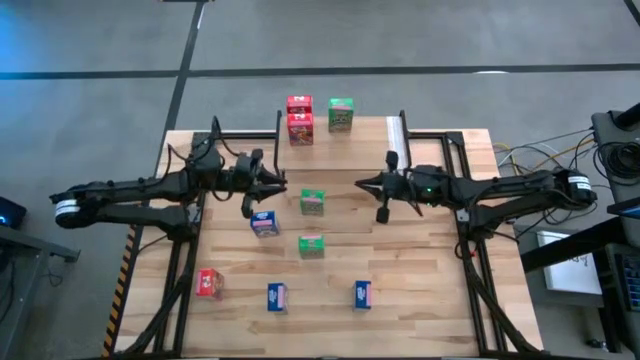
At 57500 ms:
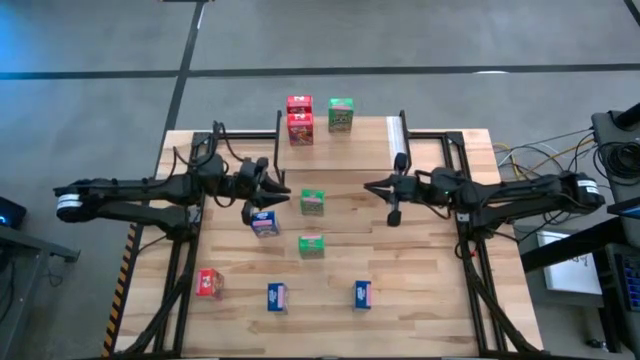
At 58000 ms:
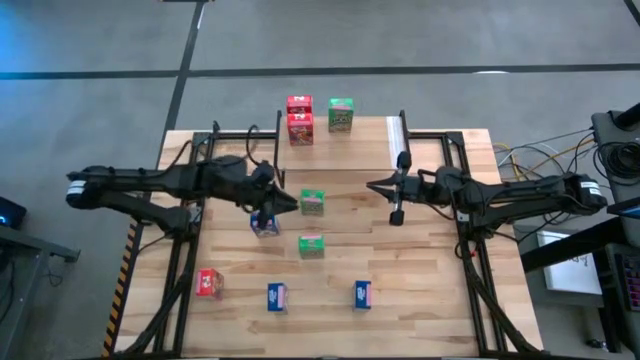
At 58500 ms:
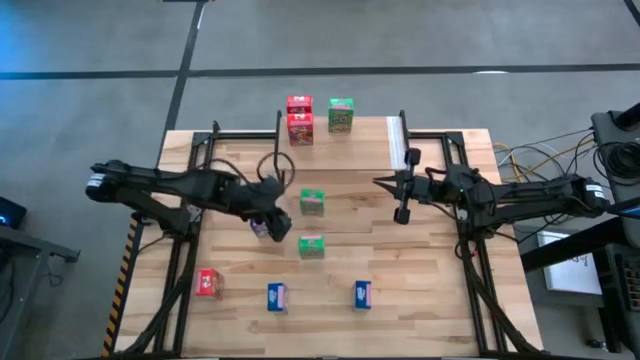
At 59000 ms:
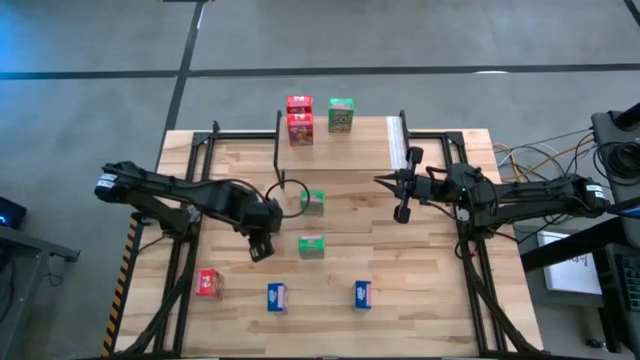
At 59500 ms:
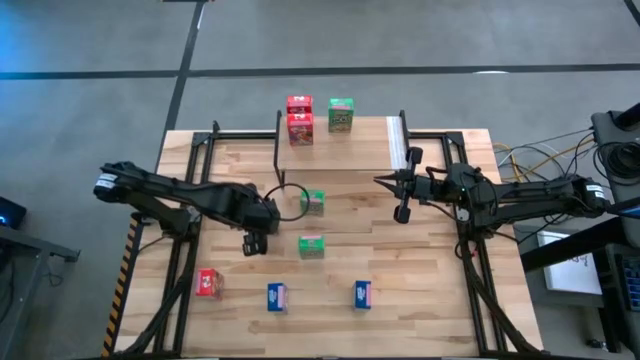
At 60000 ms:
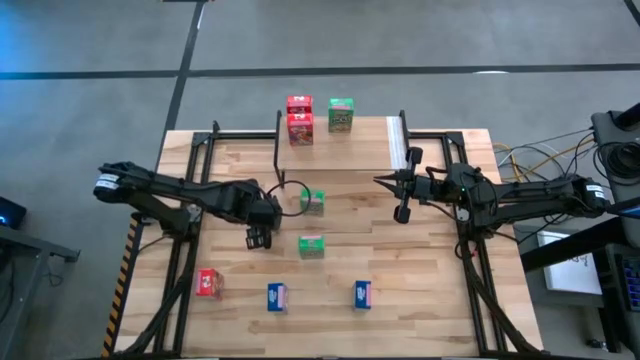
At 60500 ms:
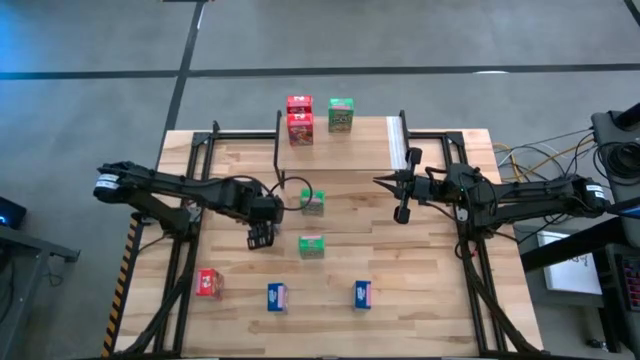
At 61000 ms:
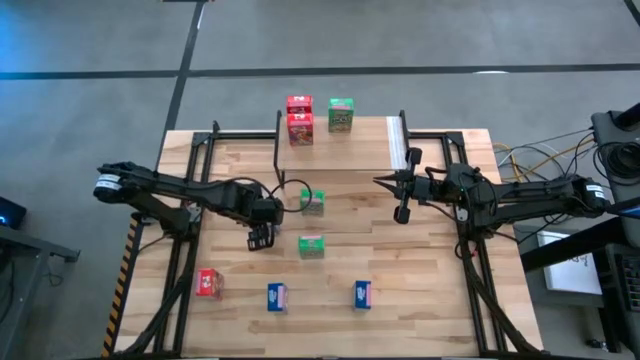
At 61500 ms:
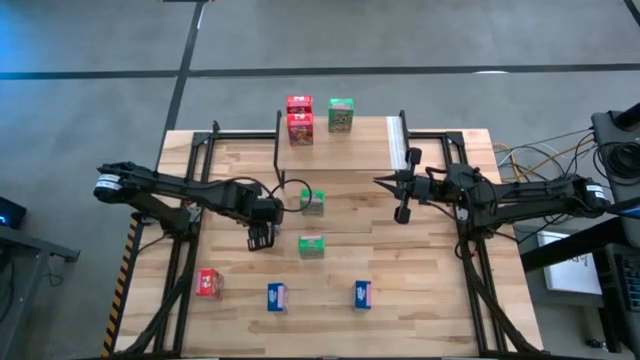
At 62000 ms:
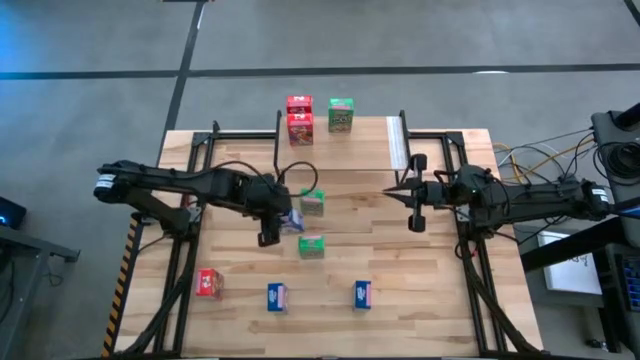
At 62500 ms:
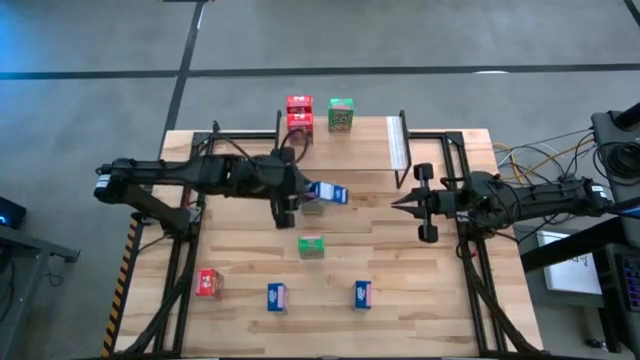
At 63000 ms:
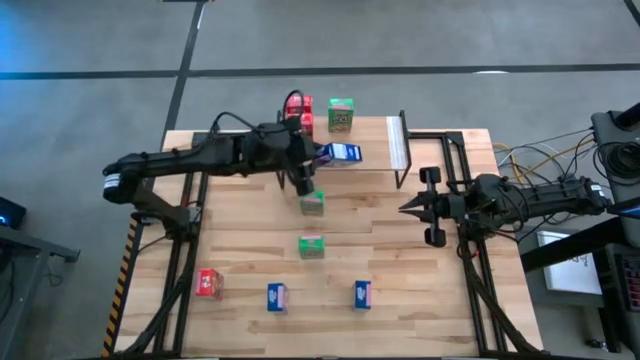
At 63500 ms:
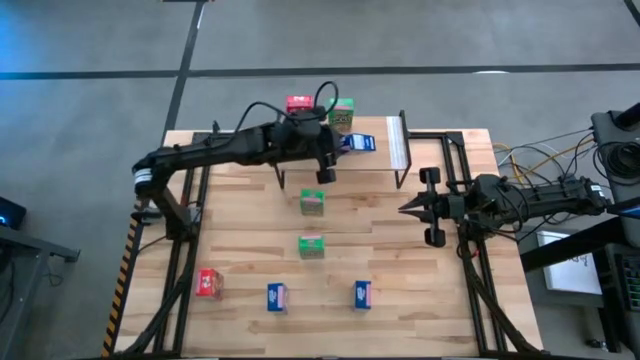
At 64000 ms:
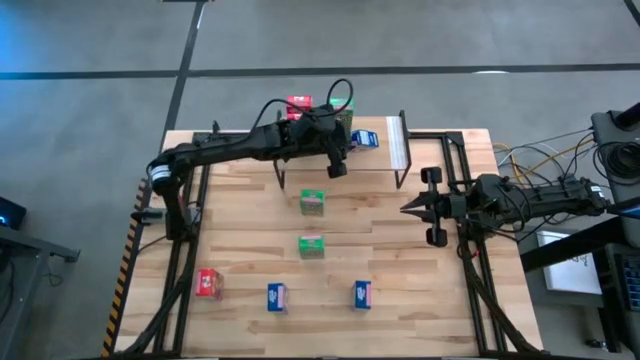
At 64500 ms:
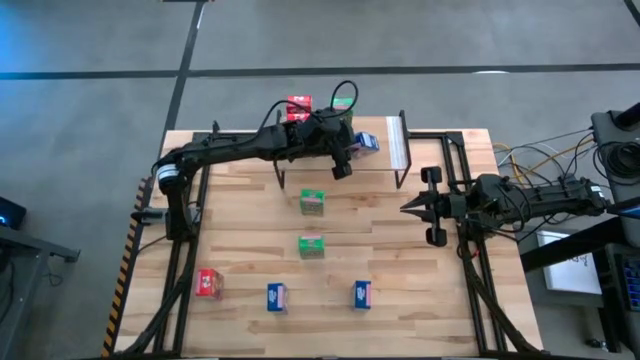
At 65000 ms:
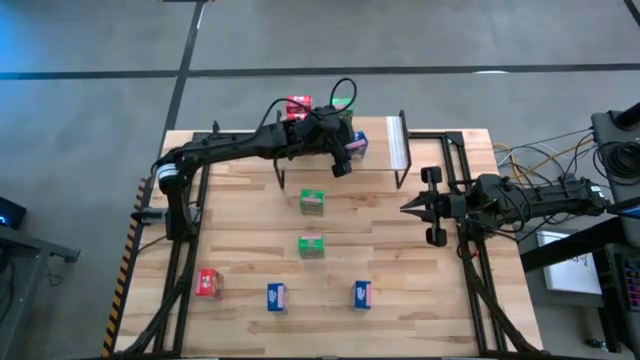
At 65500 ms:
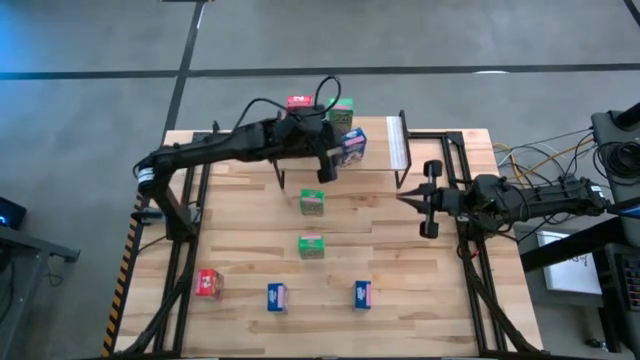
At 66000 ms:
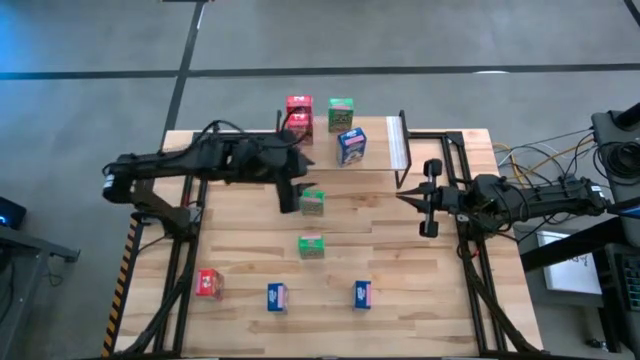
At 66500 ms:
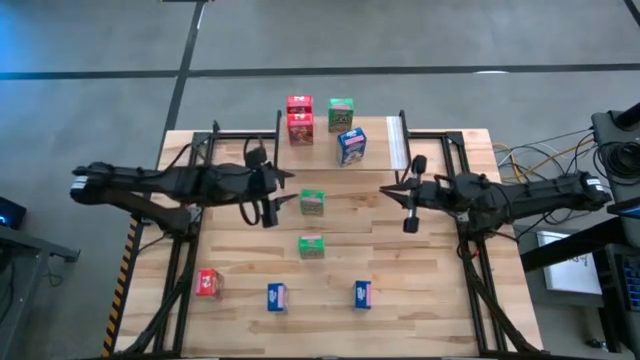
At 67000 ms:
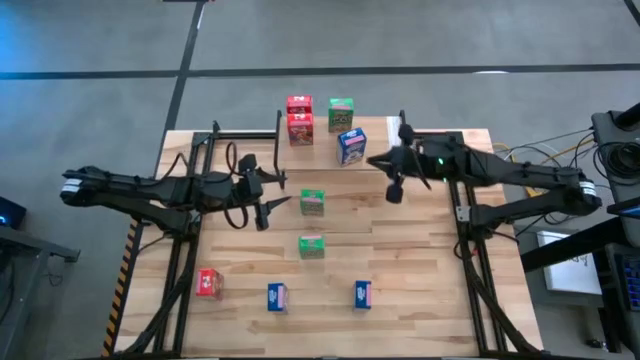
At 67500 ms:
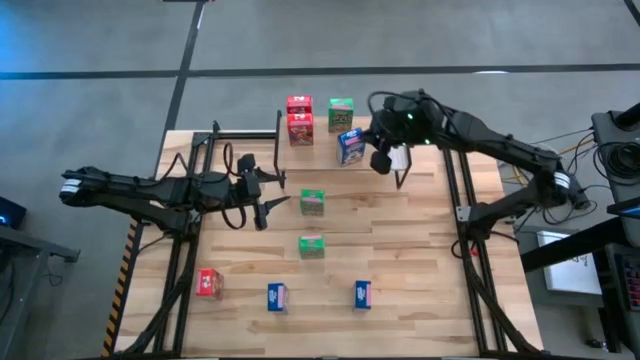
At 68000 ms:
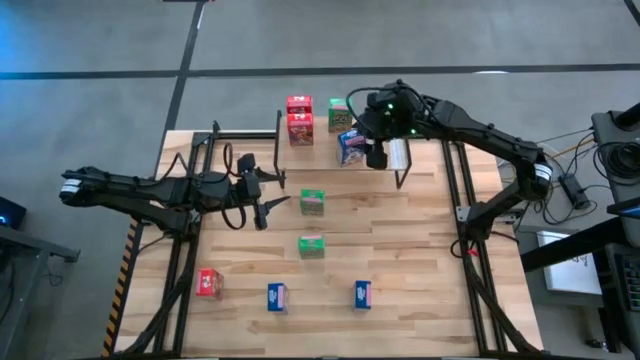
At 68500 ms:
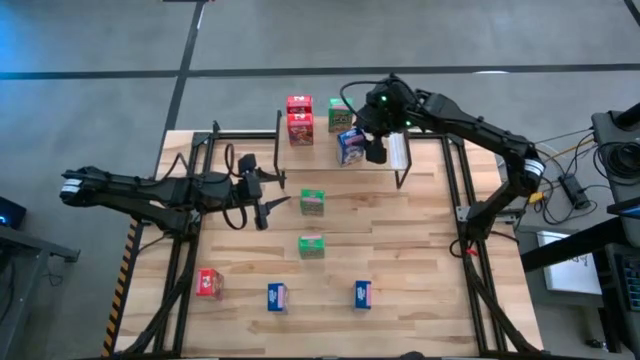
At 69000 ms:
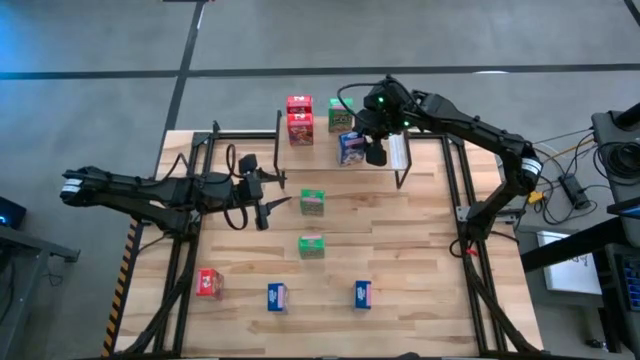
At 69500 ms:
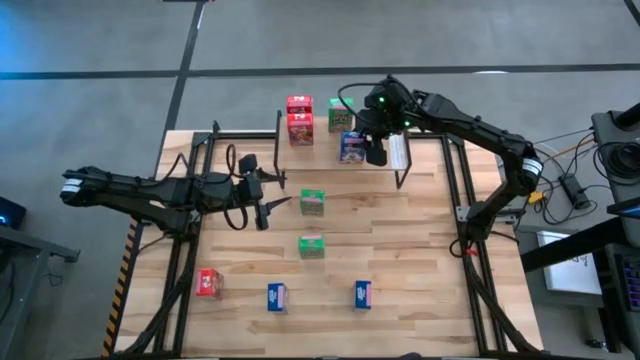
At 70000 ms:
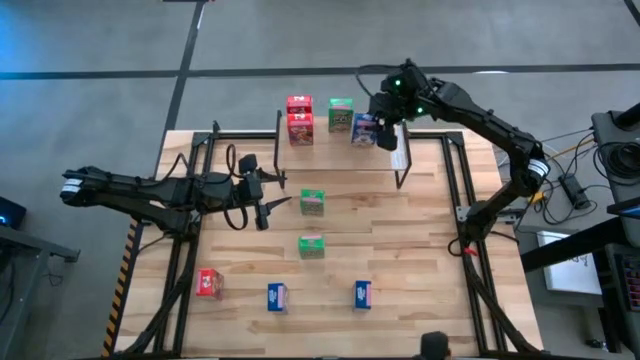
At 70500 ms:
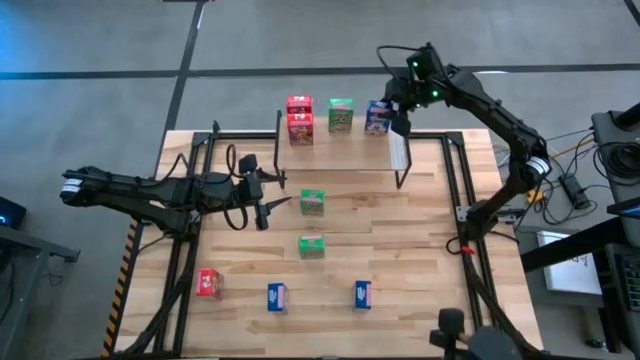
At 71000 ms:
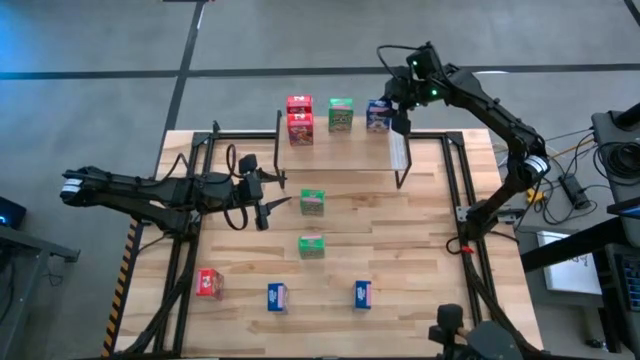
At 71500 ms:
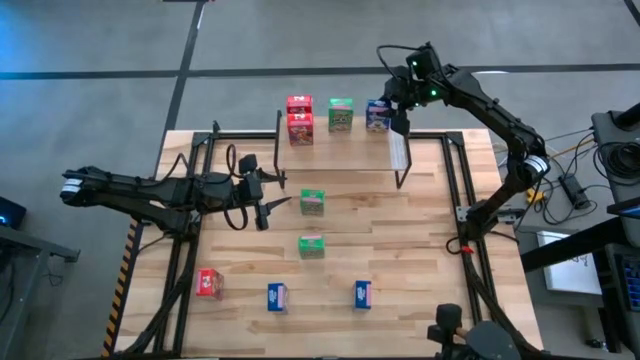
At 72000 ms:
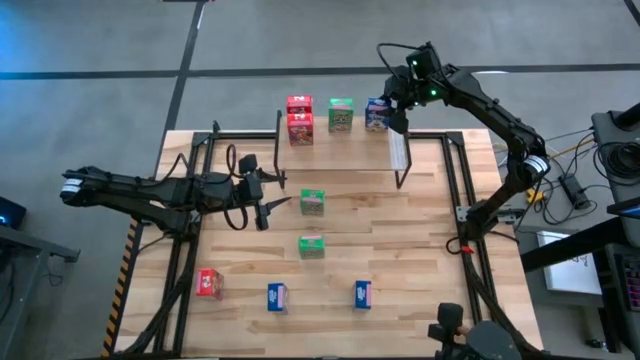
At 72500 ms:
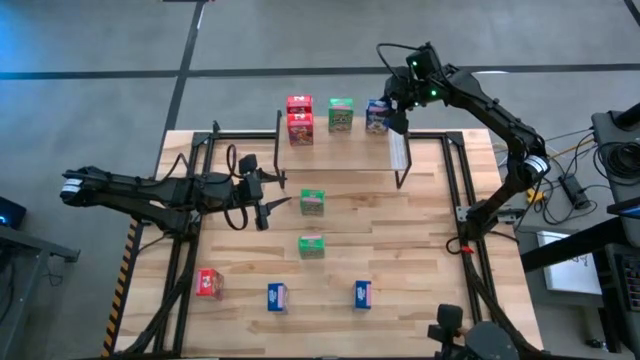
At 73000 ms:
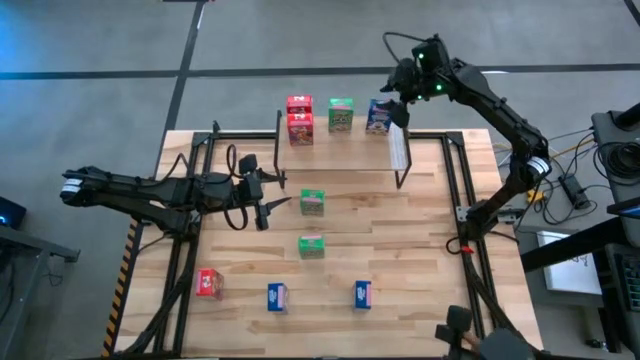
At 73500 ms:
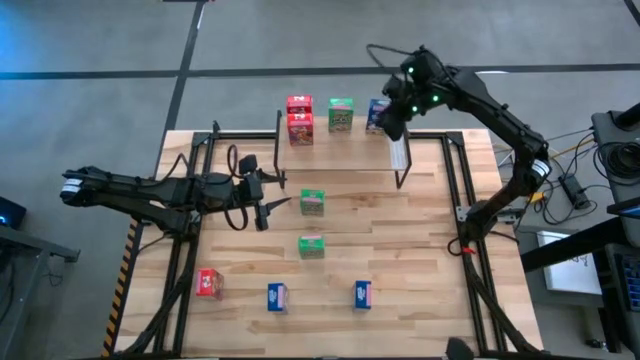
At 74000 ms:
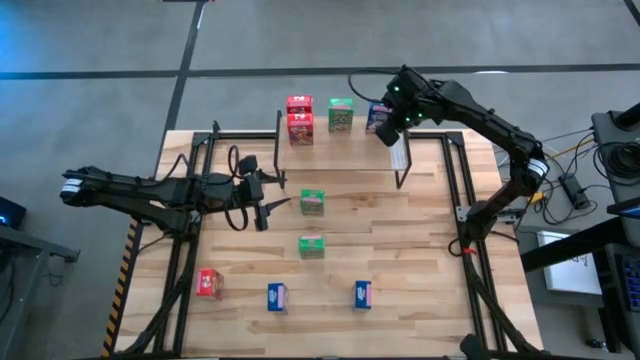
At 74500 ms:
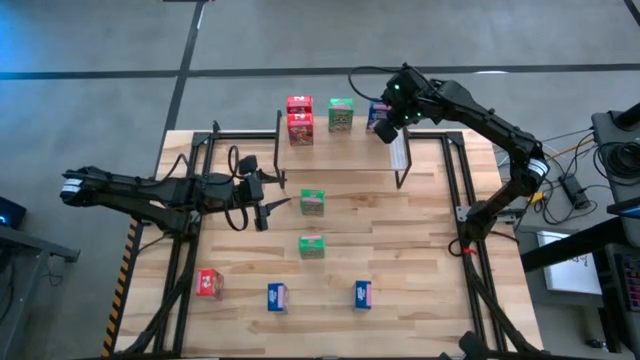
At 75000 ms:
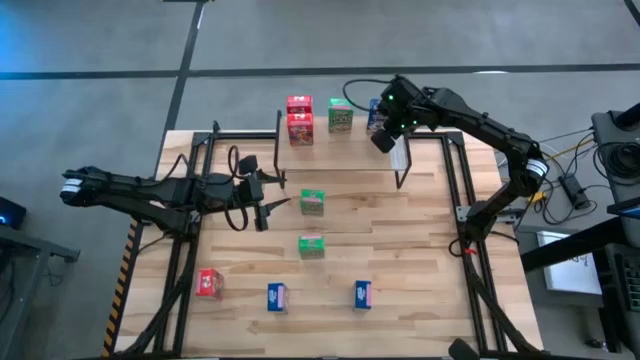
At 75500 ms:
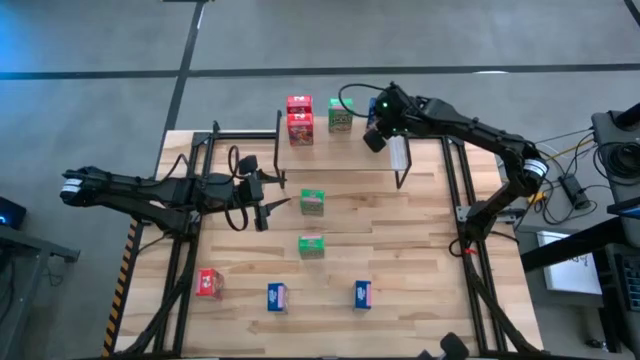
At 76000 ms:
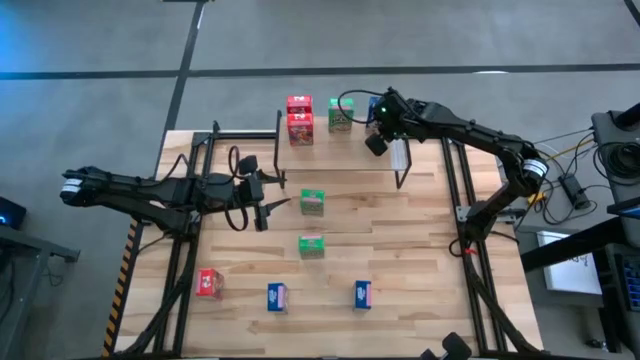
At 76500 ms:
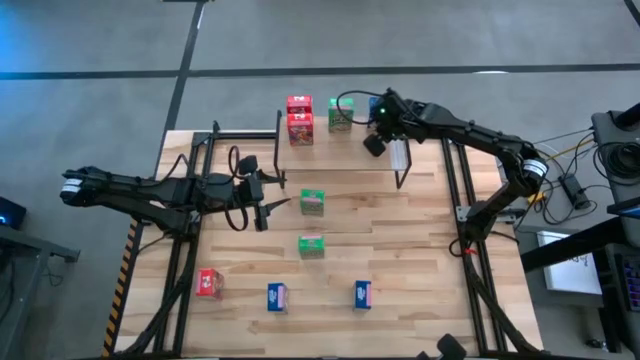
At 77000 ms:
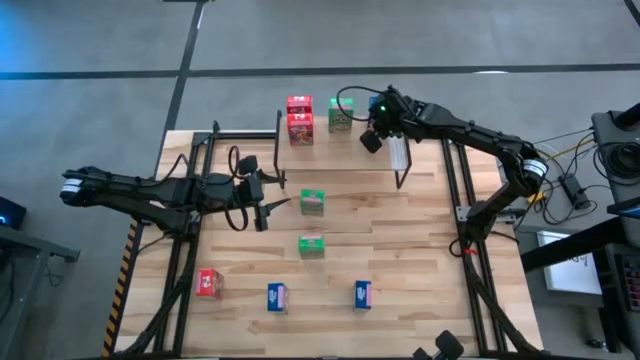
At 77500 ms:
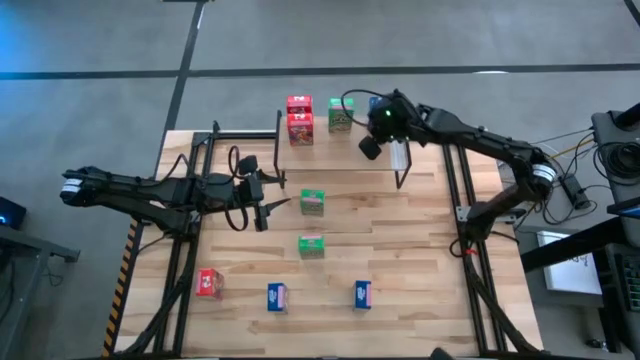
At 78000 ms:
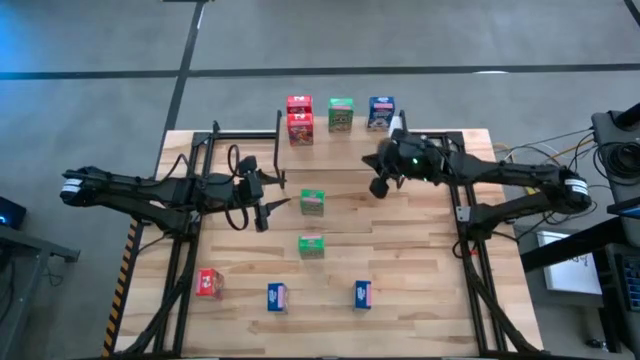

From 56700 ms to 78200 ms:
Task: Stack cereal on shelf
Put the top left blue cereal box on the shelf

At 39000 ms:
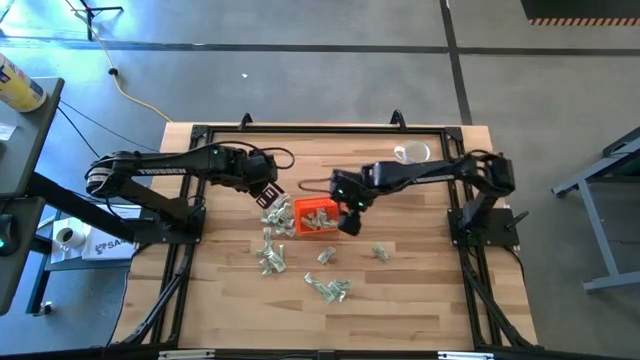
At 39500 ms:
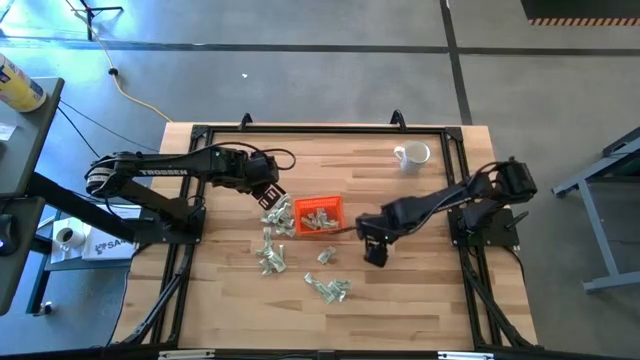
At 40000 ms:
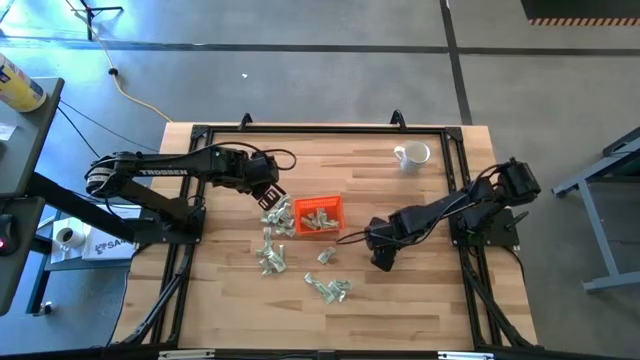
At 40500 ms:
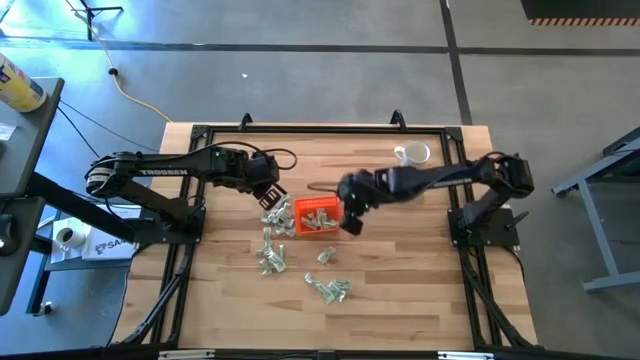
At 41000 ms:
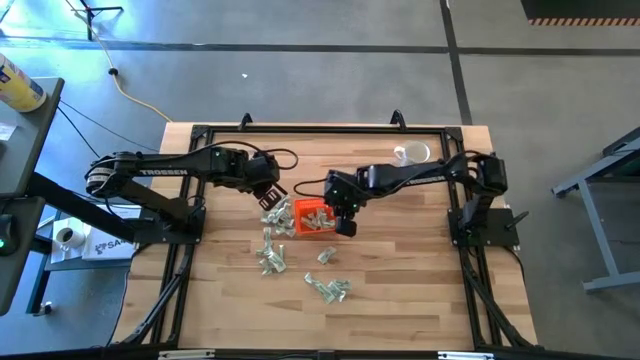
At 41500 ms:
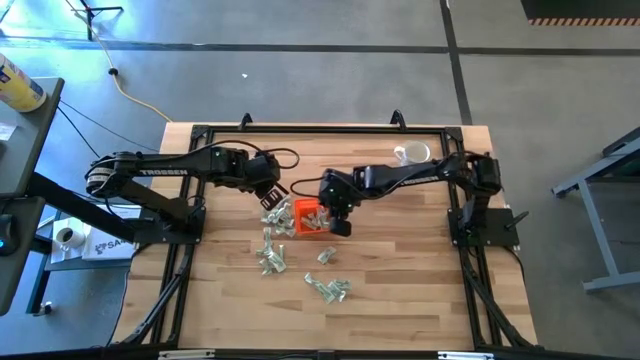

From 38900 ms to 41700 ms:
Task: Pick and place Stevia / Truvia into bins
Put the stevia packet into the orange bin
